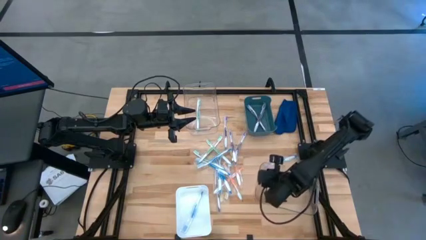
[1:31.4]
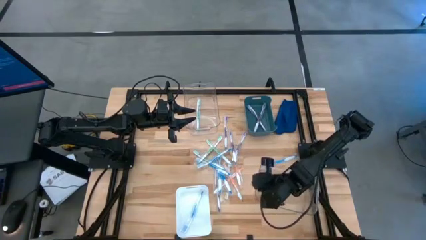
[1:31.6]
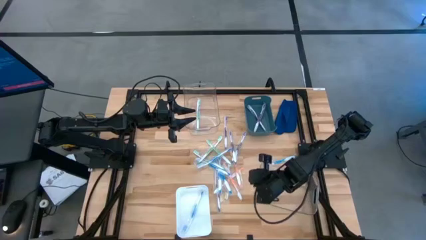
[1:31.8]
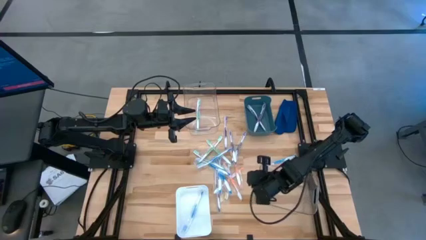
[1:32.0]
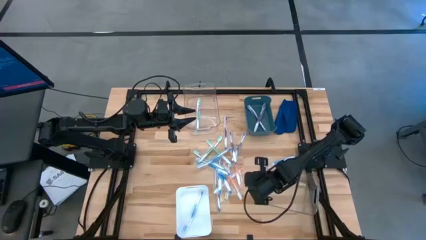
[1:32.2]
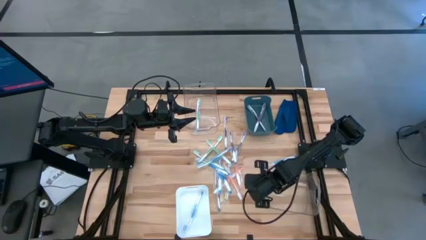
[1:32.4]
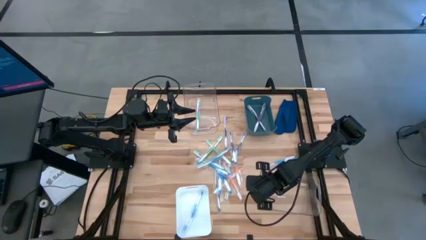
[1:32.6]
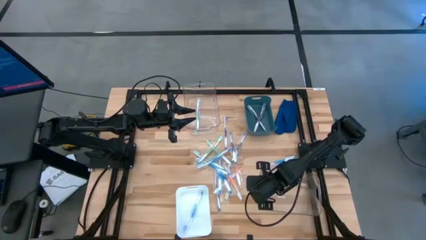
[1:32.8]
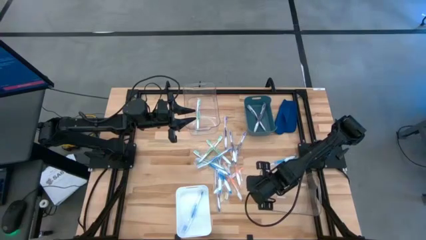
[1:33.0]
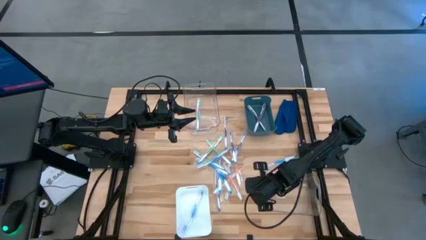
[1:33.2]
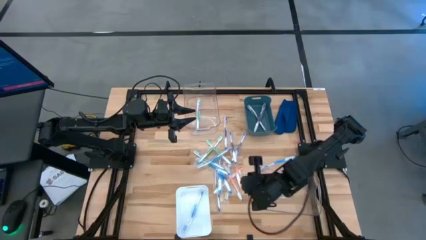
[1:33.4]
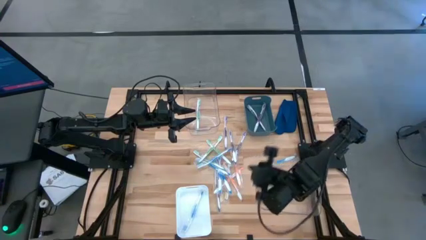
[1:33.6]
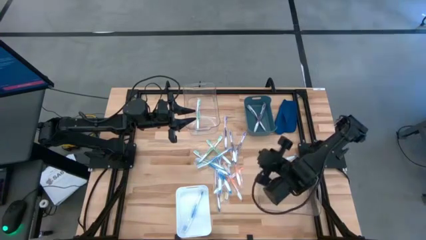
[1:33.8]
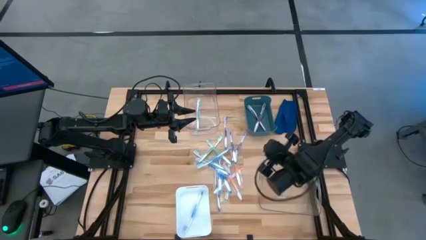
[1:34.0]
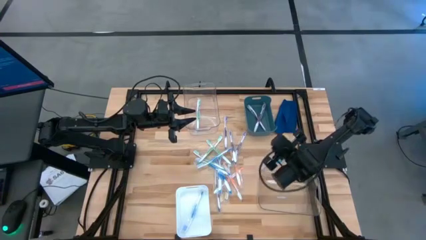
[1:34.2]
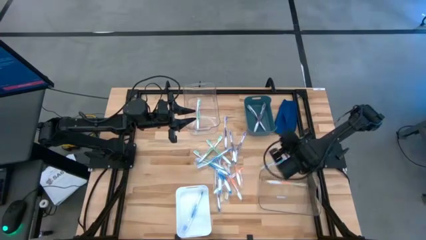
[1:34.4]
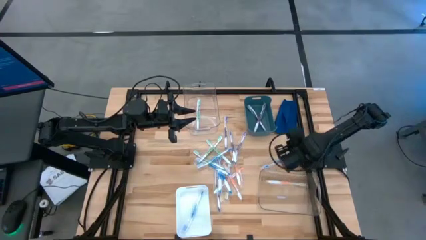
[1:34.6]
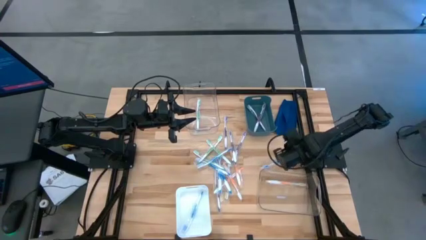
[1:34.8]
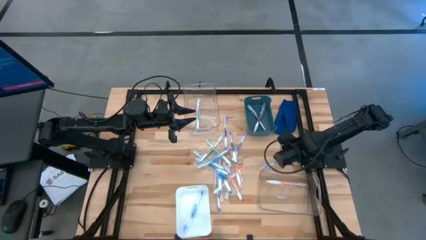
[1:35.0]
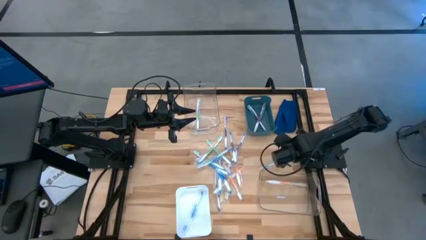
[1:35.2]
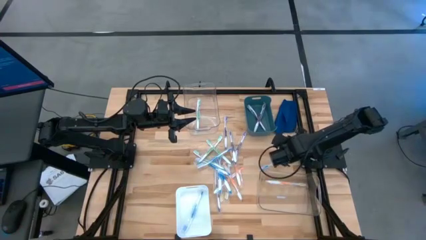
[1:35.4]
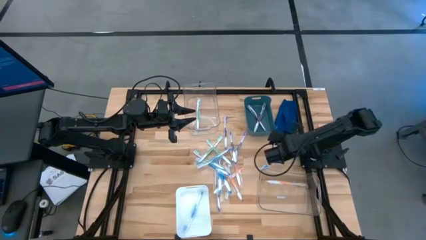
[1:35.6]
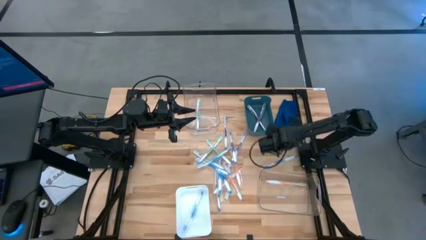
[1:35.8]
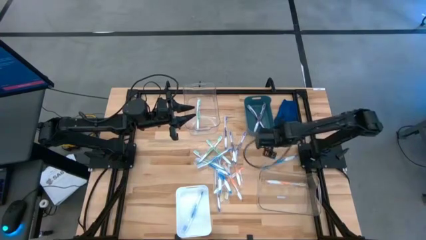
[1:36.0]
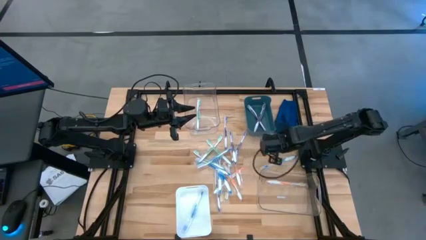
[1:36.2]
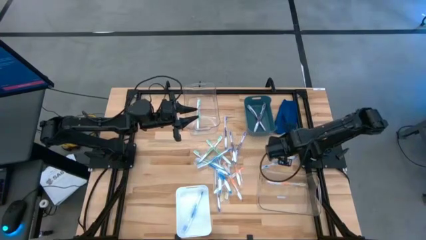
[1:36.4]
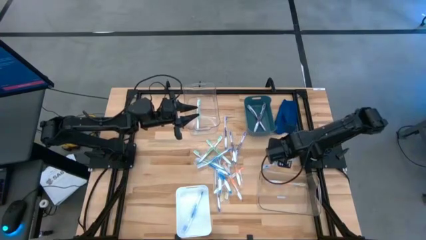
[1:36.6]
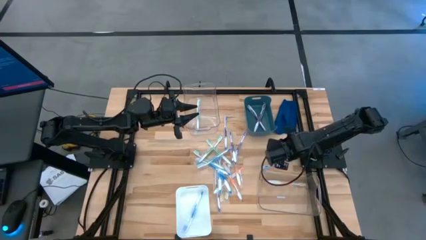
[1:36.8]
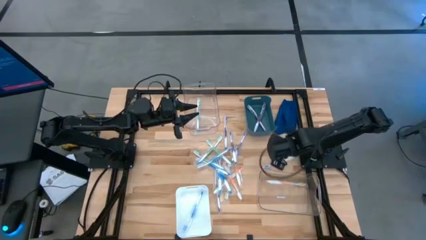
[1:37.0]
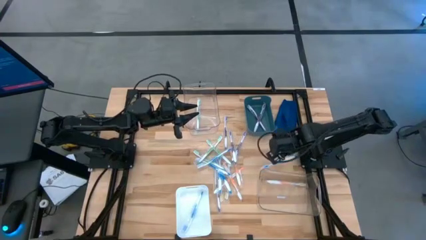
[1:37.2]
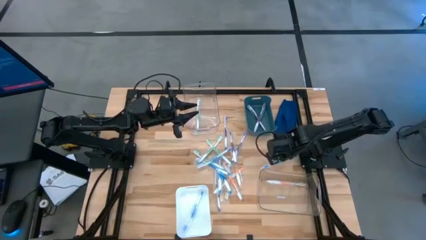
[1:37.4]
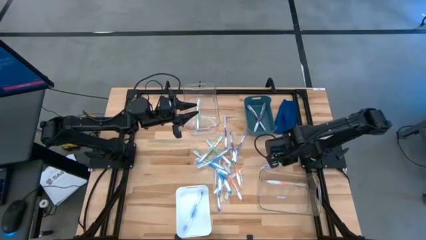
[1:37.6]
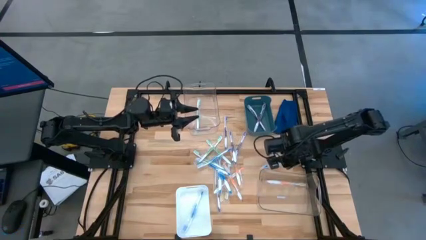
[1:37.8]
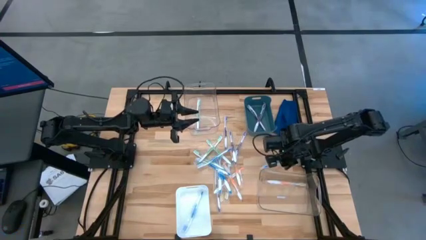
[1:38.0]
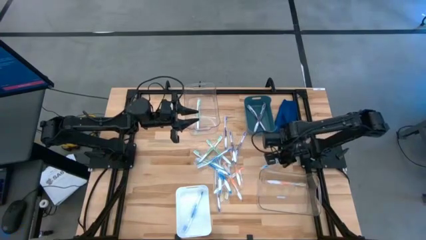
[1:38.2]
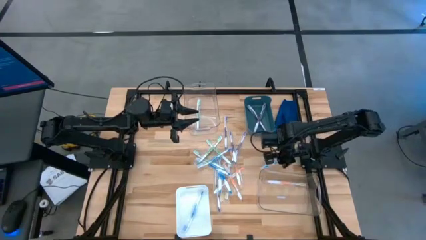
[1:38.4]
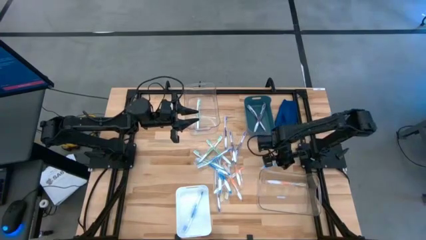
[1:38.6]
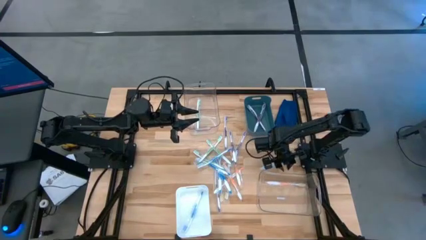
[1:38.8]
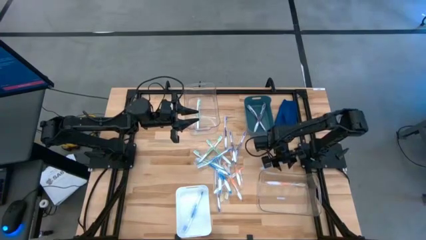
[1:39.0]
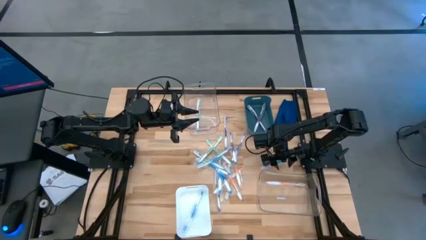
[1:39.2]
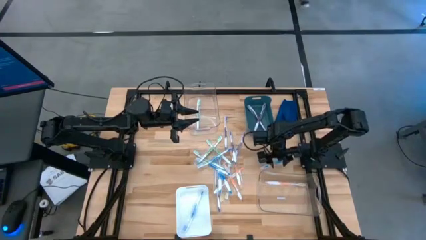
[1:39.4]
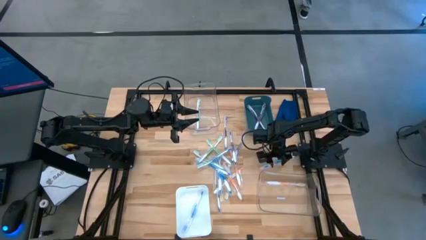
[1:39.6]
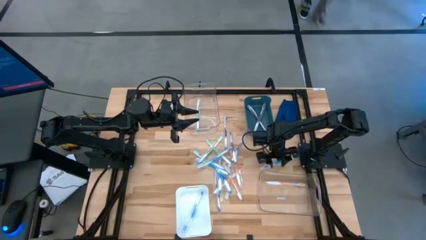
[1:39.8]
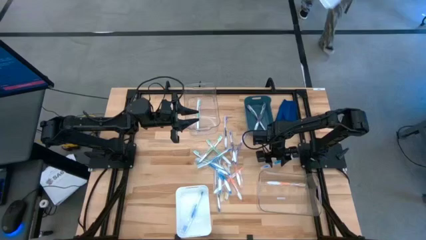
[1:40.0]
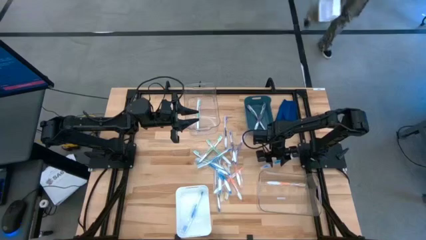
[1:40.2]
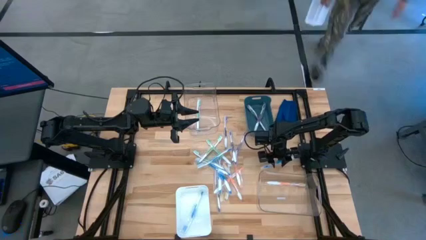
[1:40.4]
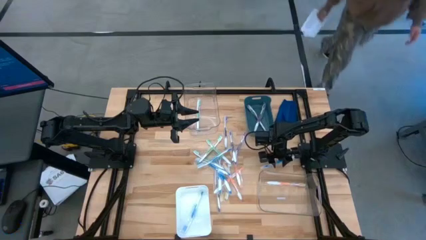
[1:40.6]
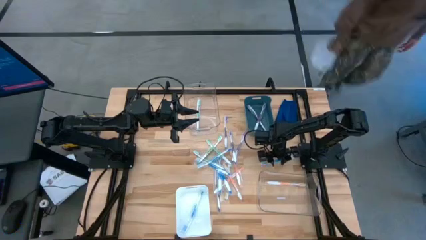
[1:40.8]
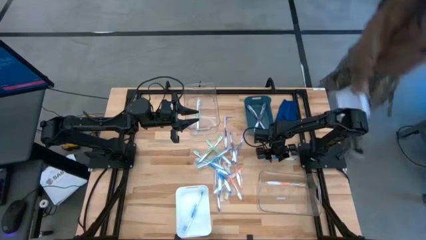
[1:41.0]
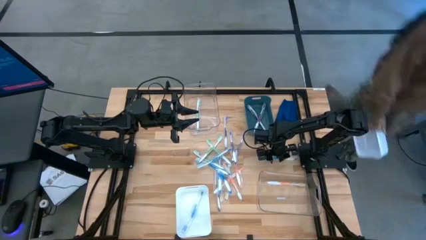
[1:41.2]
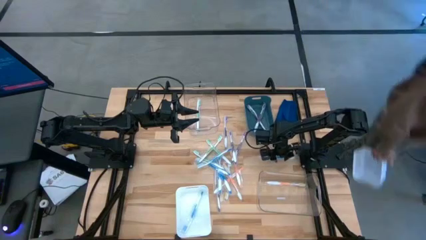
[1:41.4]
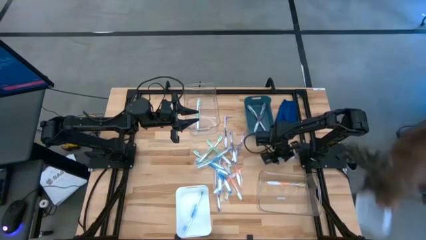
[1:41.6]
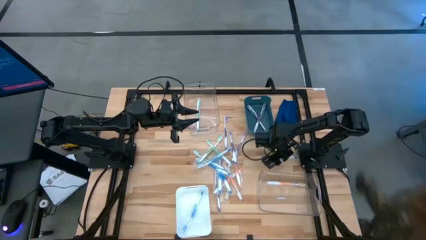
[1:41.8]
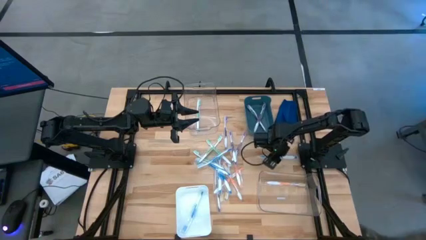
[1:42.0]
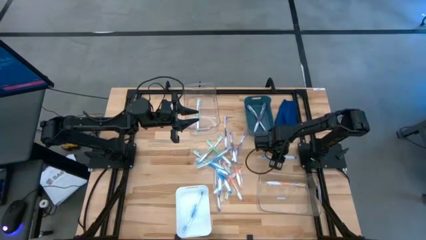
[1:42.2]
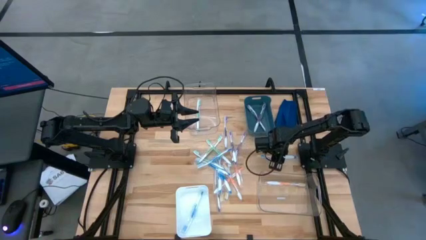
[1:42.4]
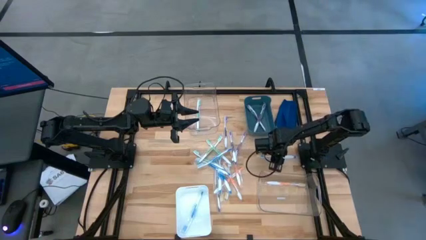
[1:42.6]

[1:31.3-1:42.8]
Task: Pick & Place Toothbrushes
Put the blue toothbrush into the white bin

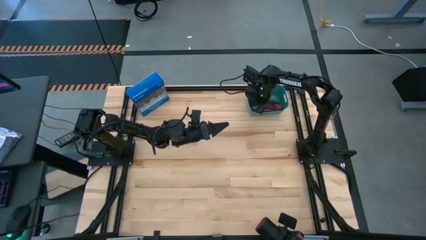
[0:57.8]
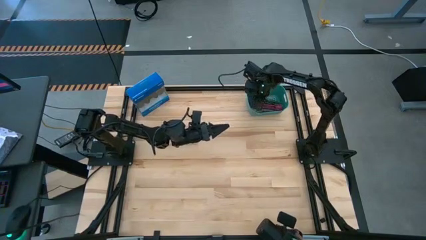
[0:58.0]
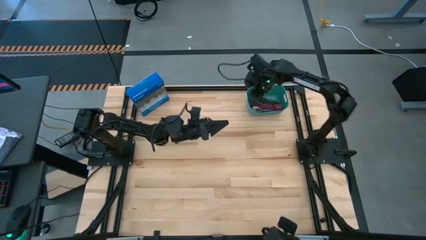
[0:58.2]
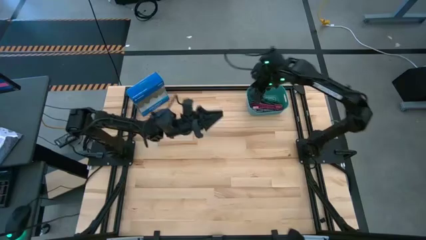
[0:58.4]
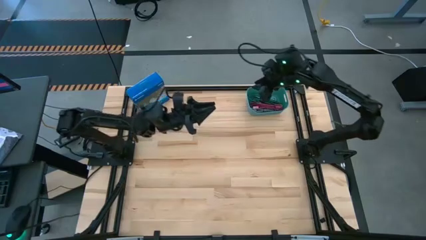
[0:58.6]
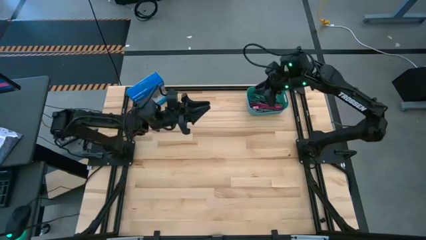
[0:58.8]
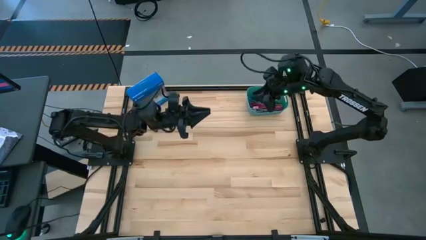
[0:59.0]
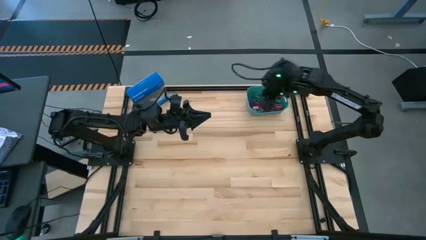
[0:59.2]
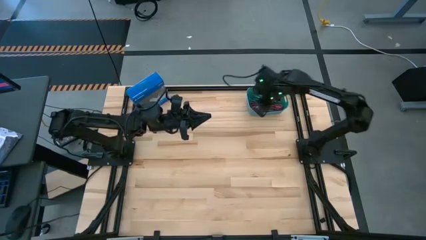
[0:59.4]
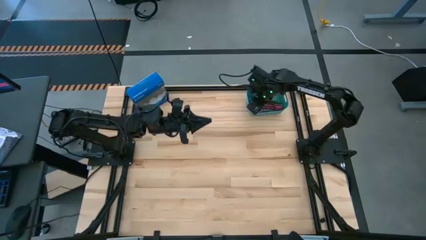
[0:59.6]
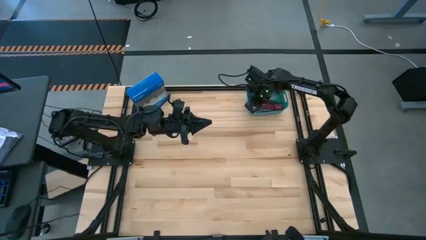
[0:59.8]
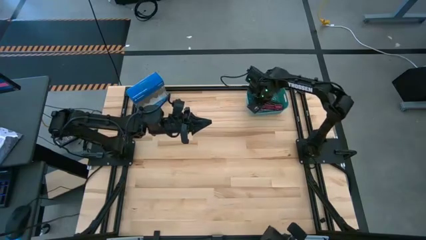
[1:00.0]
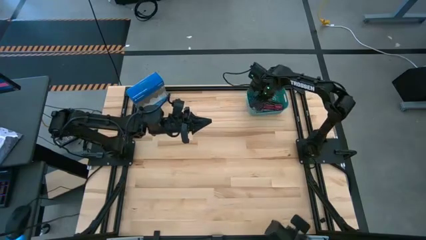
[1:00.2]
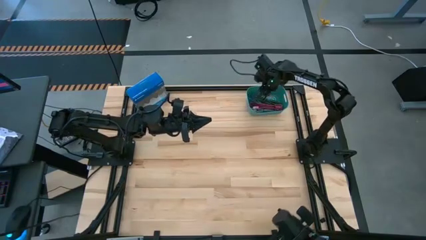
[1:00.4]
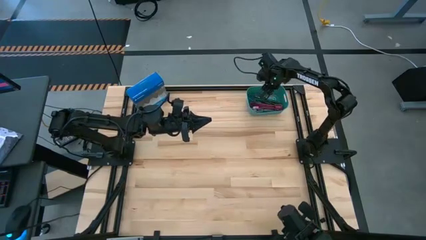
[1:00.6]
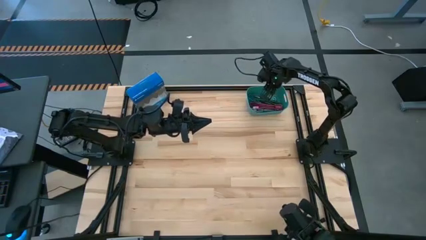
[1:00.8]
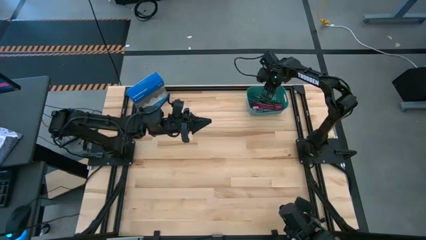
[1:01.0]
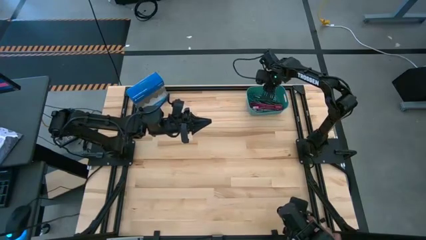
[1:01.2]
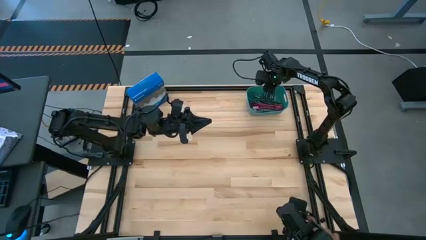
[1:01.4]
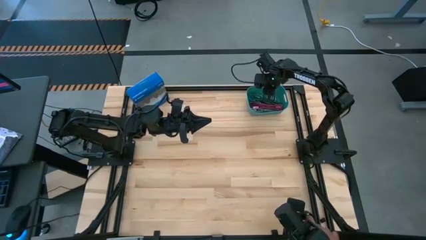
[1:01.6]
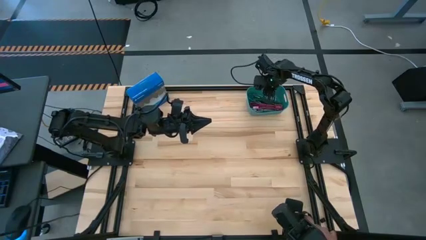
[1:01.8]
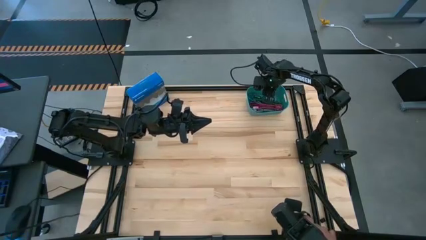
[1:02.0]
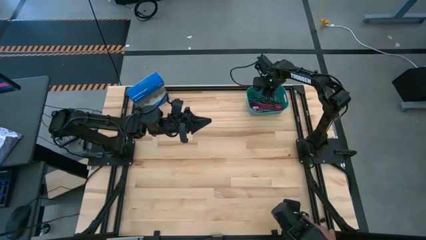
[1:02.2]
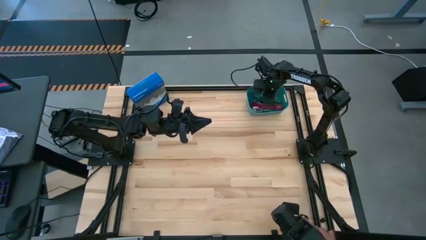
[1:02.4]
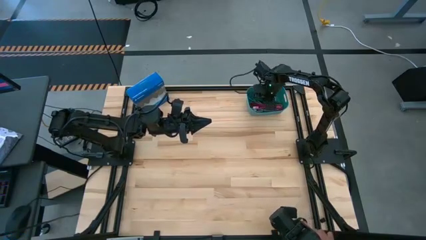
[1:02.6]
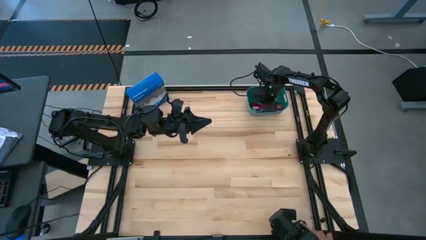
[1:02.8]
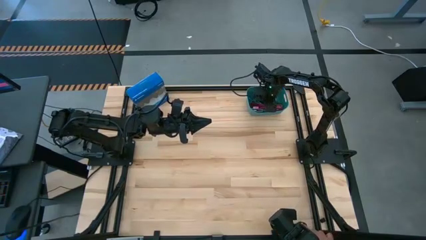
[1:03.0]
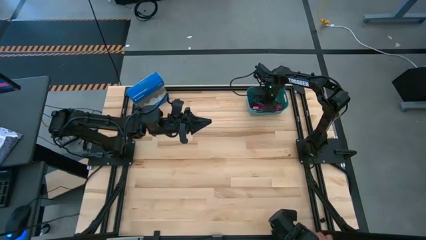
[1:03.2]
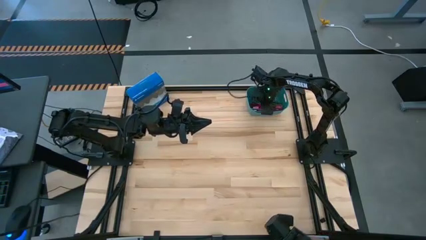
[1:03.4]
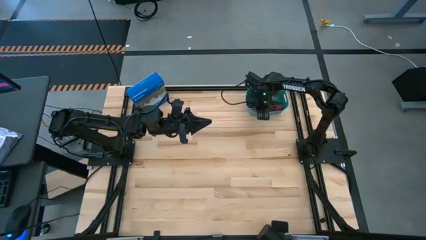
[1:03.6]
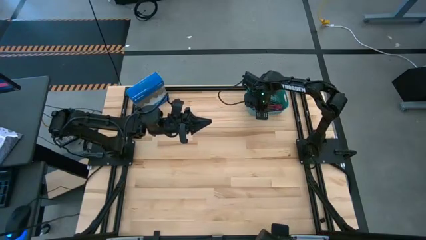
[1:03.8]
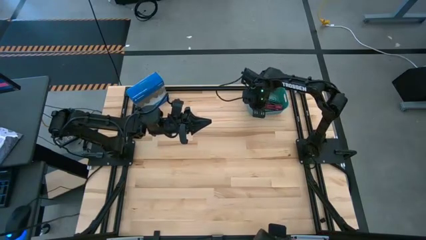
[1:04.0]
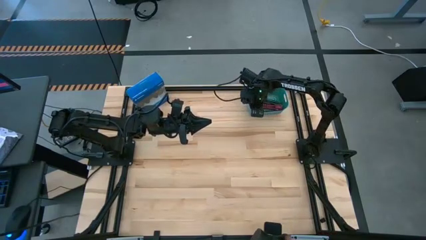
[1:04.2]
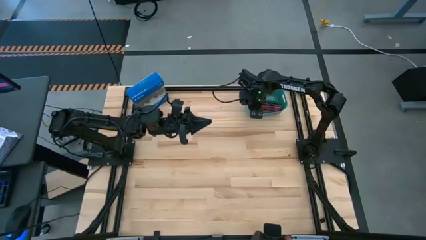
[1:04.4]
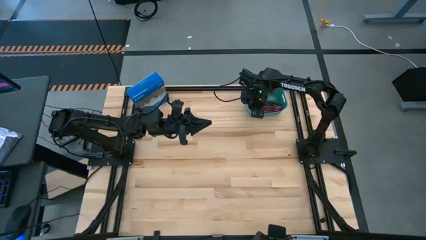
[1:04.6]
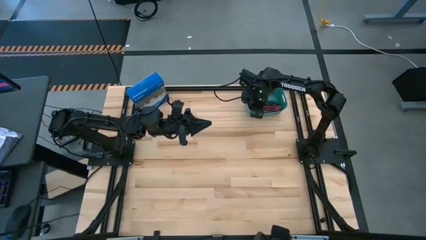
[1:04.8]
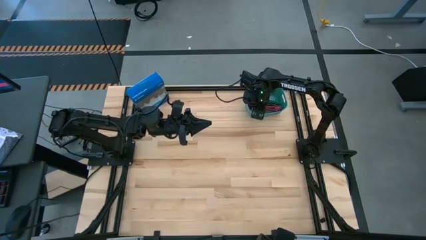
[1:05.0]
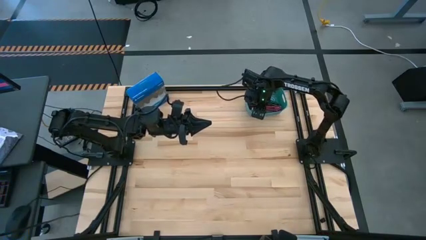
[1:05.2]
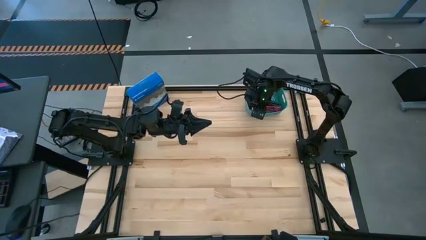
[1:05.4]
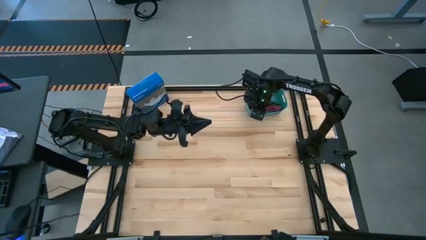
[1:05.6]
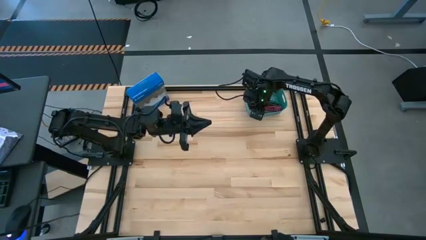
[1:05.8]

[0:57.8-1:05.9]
Task: Pick and place USB-C Cables
Move the green bin to the center of the table
